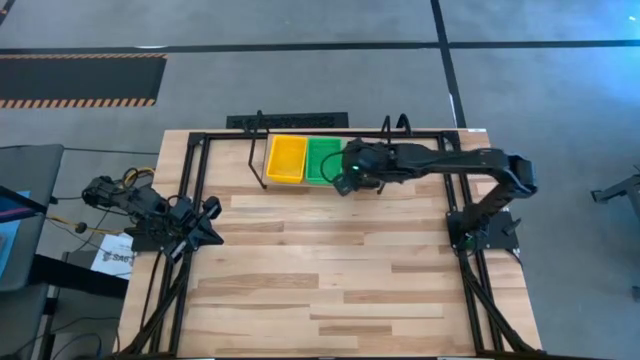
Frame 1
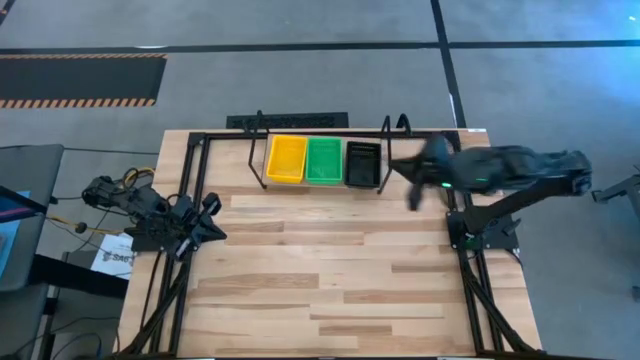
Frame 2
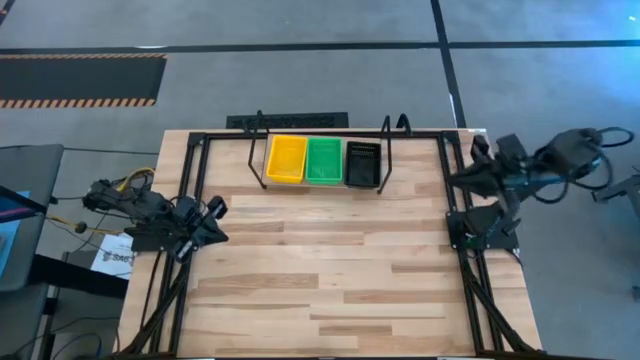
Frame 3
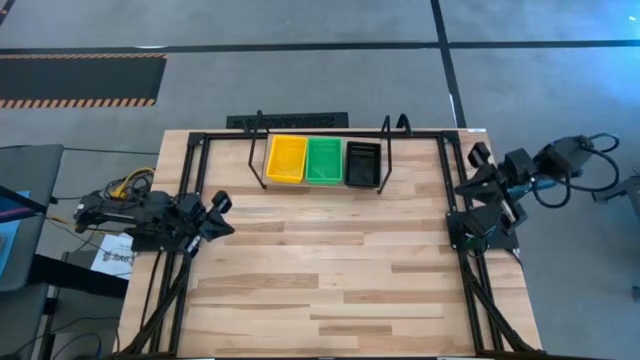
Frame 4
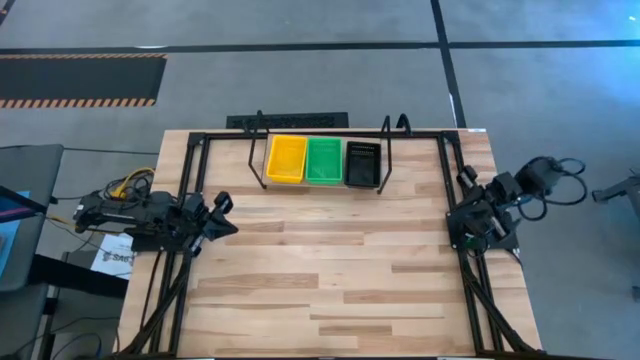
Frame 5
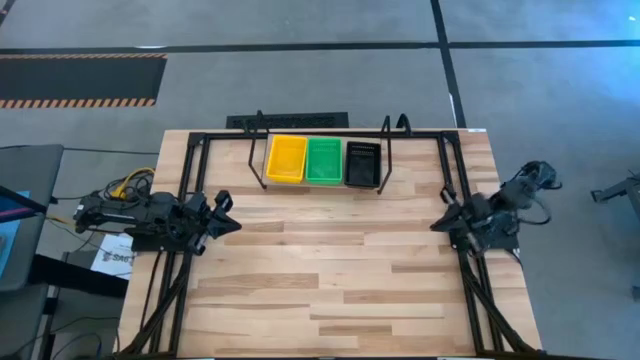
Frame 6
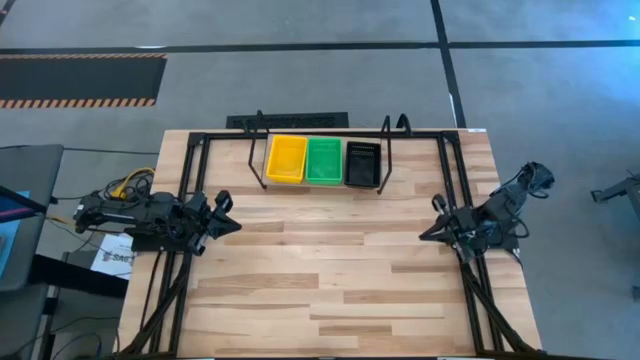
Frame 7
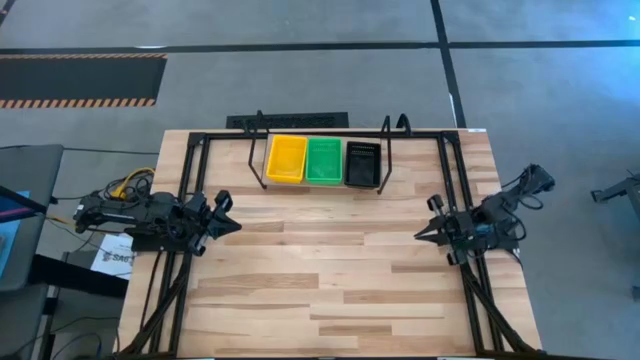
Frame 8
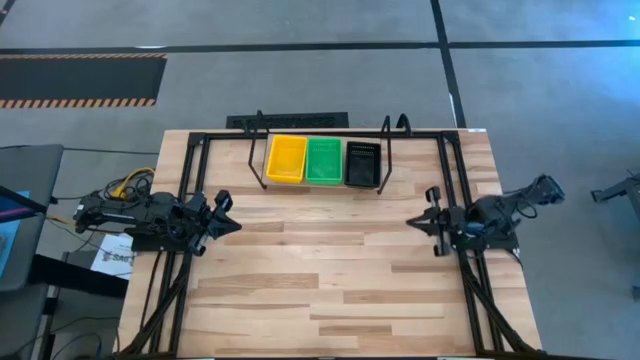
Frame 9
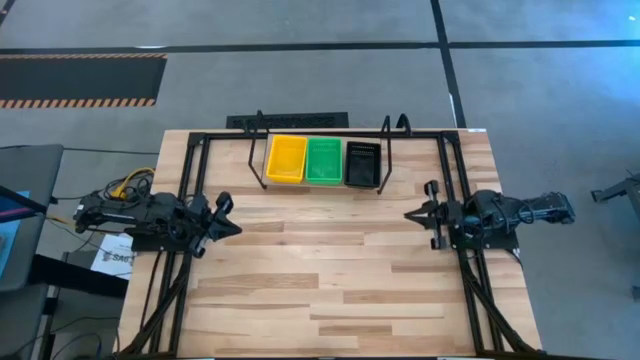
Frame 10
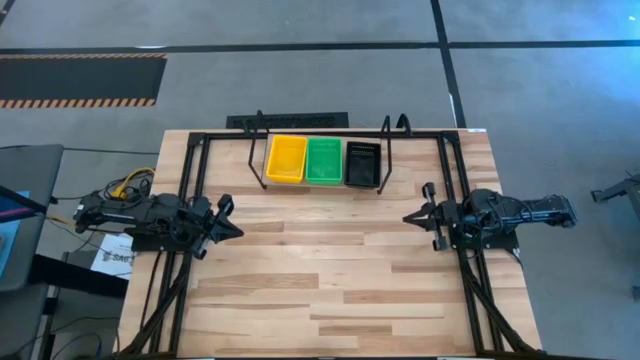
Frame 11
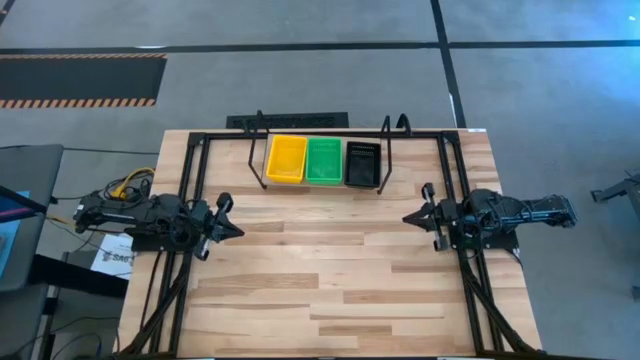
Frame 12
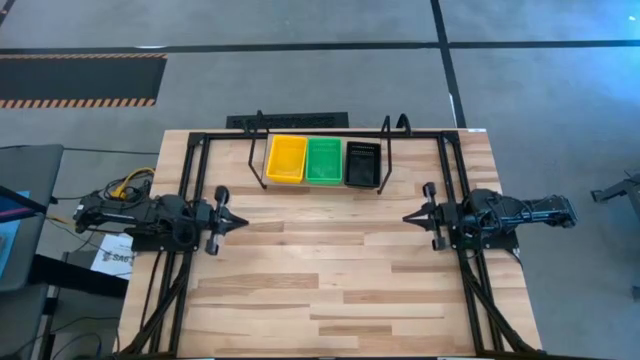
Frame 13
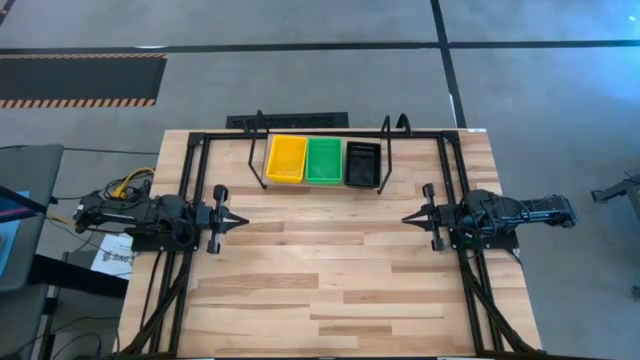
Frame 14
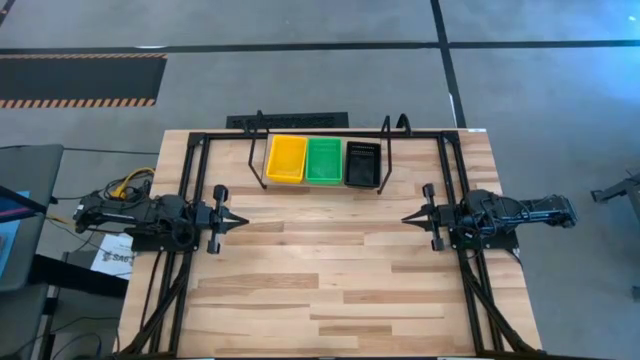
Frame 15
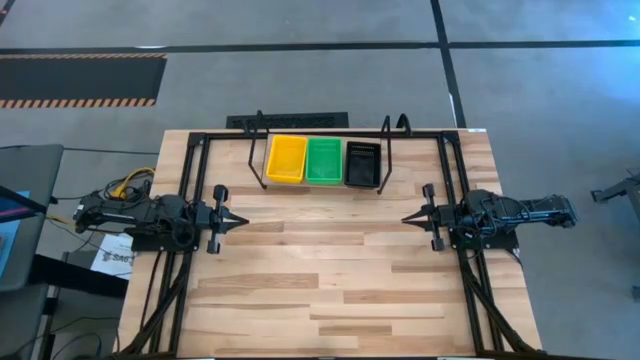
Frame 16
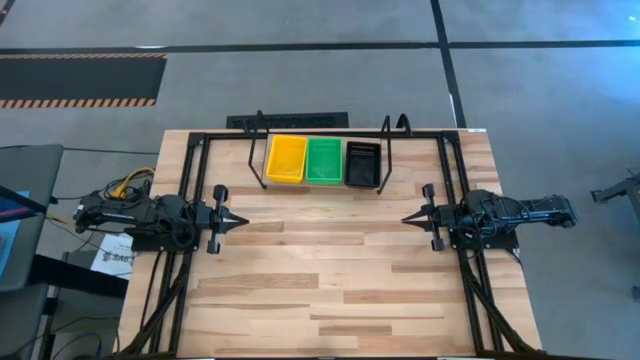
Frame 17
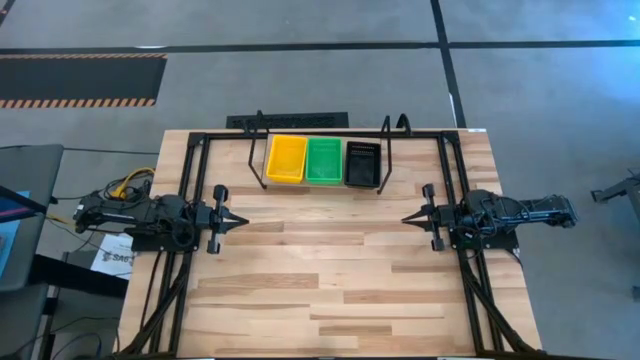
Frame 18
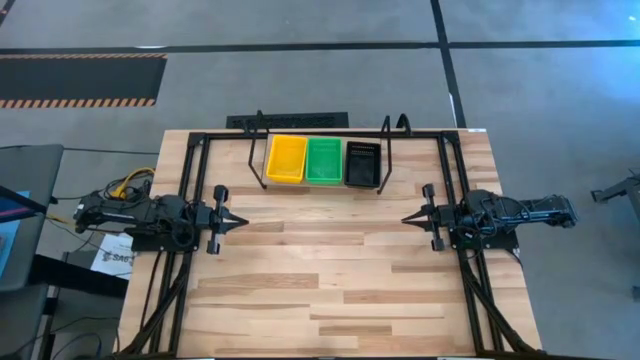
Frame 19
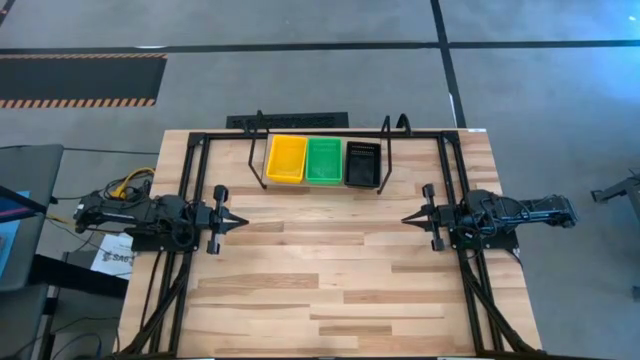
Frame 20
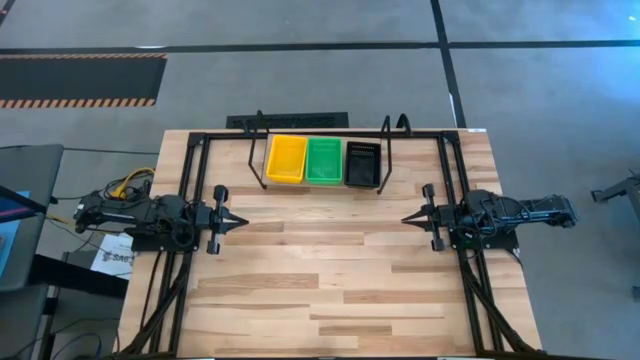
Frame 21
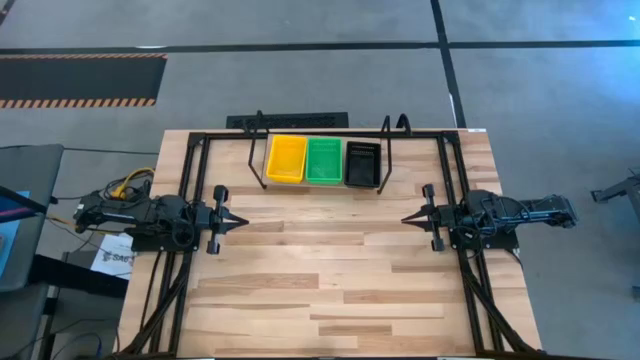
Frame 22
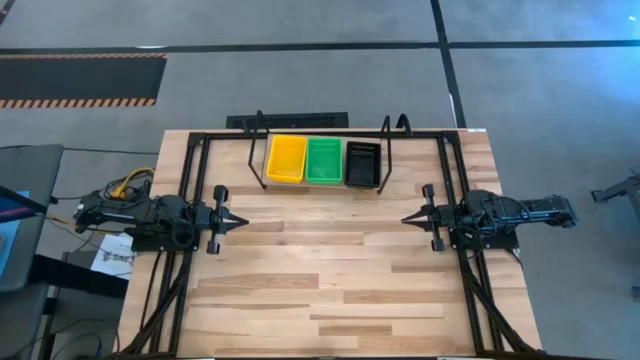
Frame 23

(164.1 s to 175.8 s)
Task: Stack baskets on shelf by color
Return to Home Position

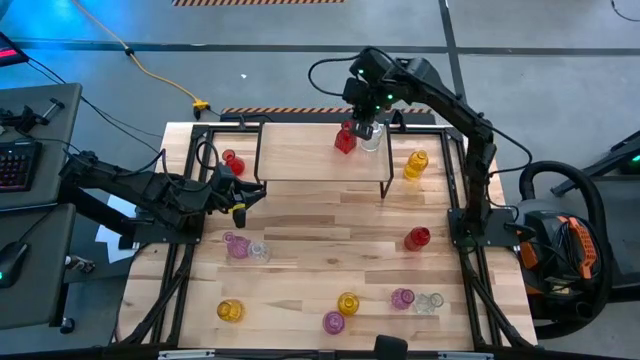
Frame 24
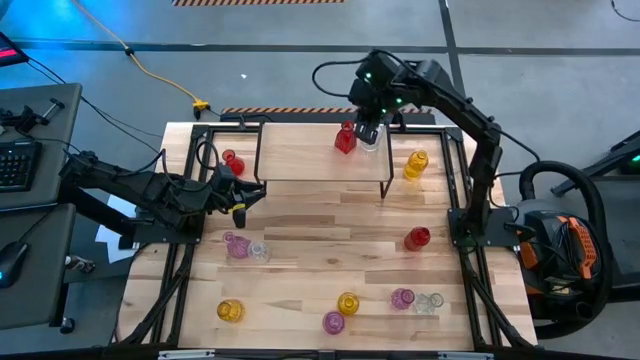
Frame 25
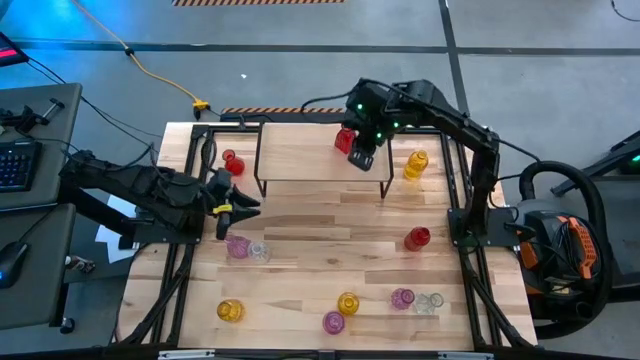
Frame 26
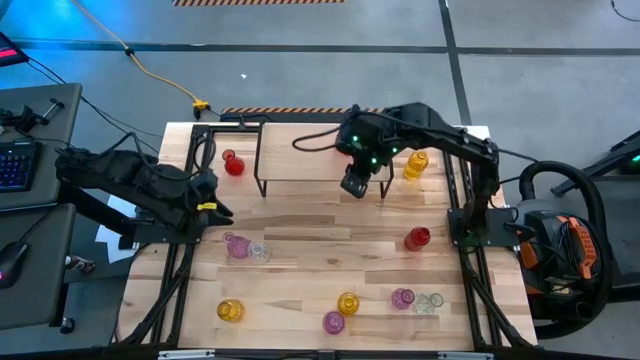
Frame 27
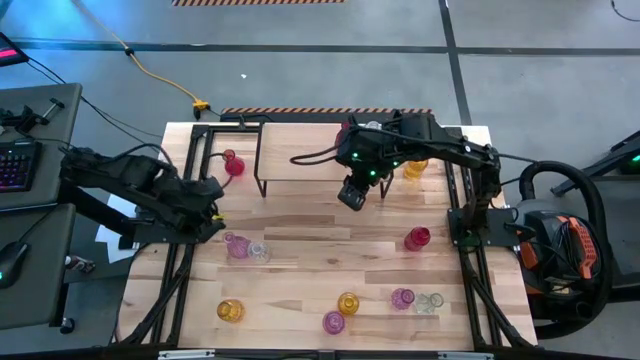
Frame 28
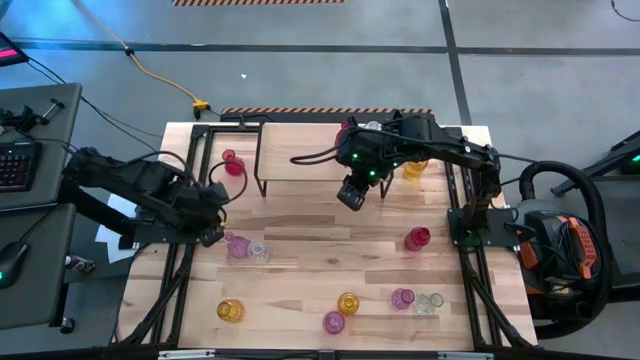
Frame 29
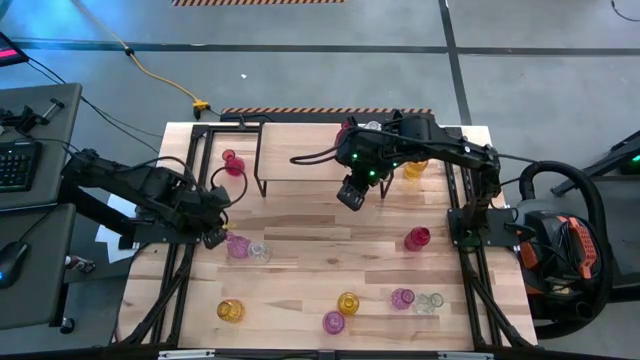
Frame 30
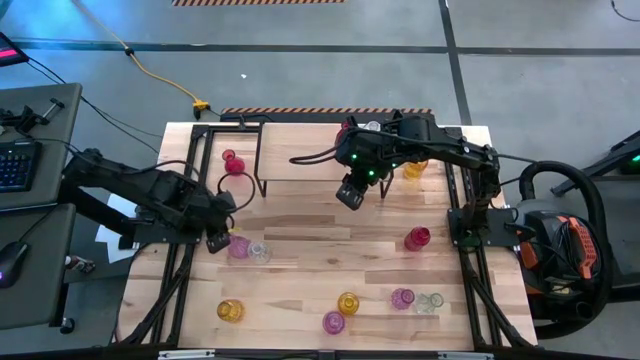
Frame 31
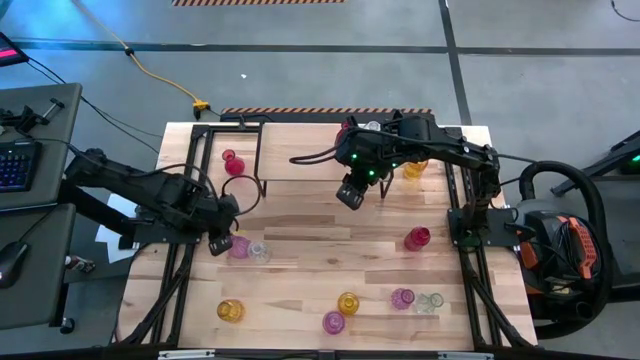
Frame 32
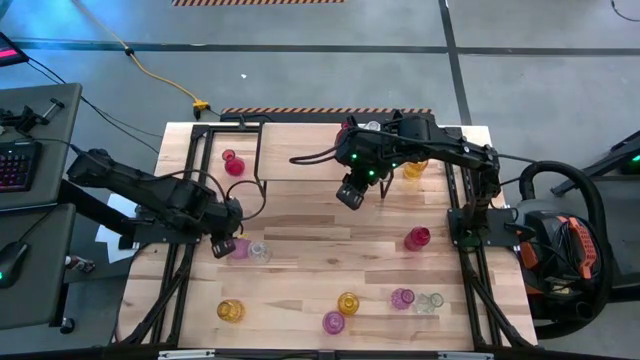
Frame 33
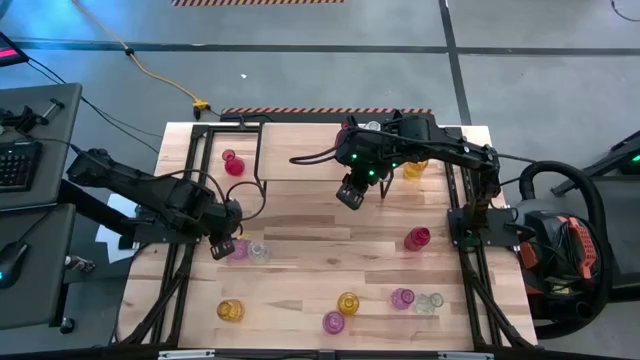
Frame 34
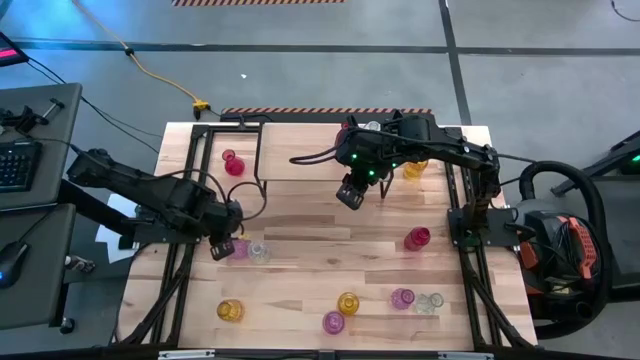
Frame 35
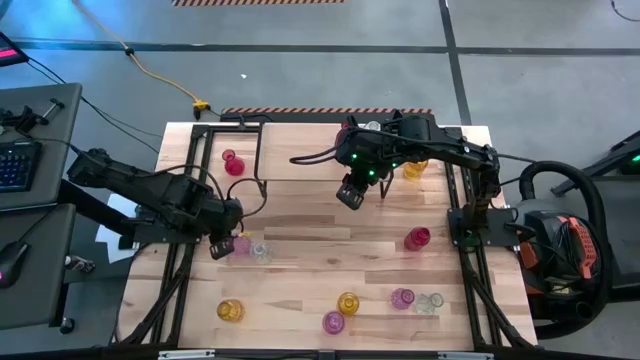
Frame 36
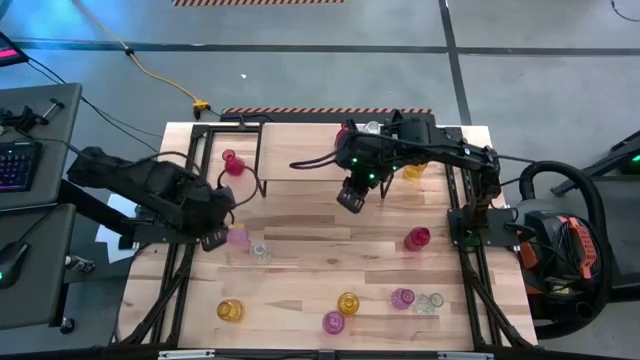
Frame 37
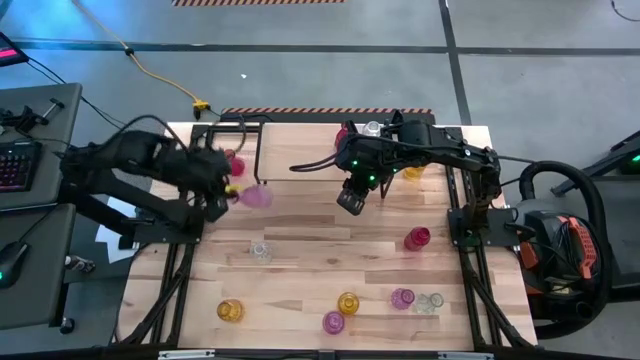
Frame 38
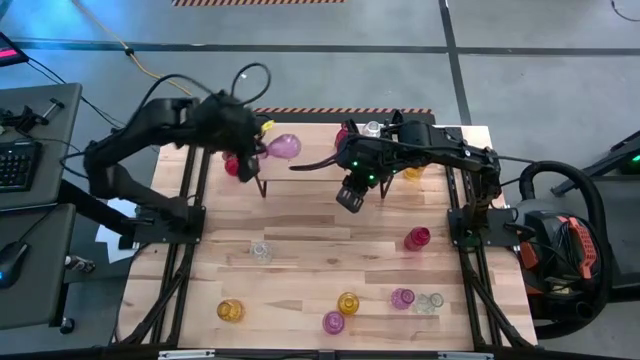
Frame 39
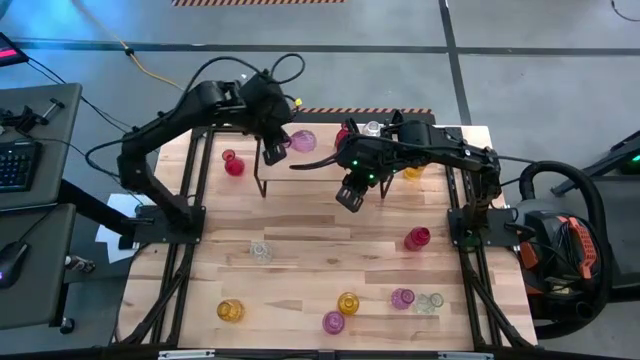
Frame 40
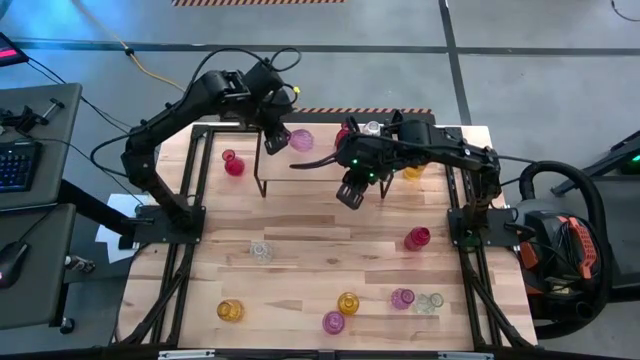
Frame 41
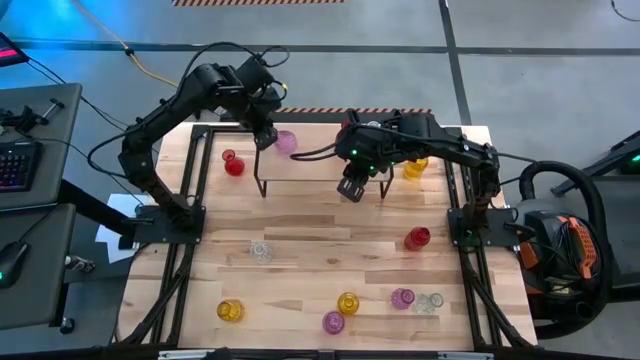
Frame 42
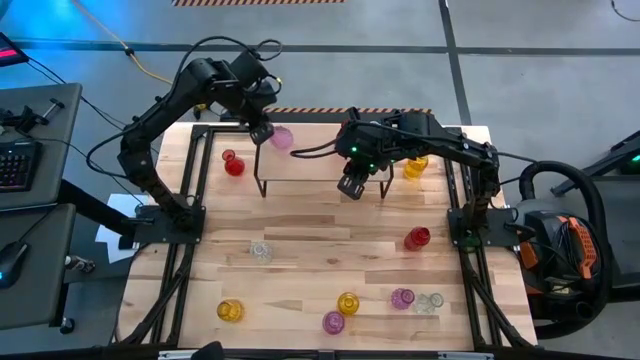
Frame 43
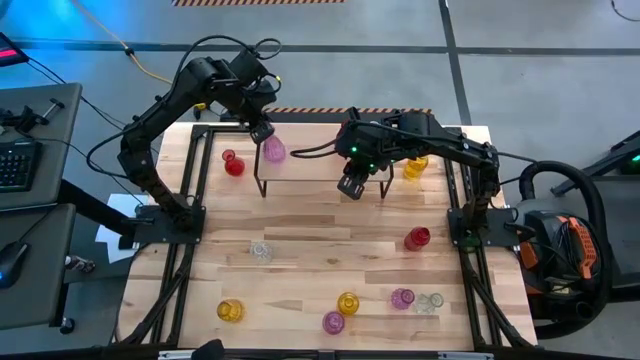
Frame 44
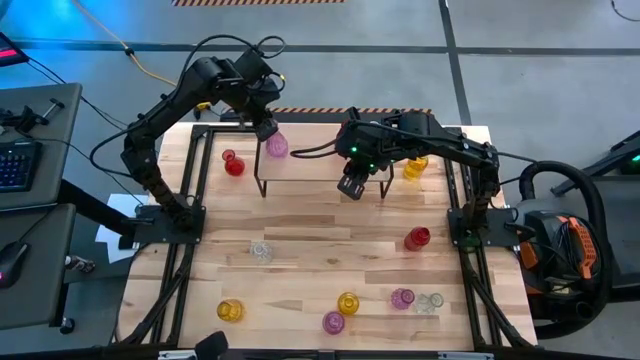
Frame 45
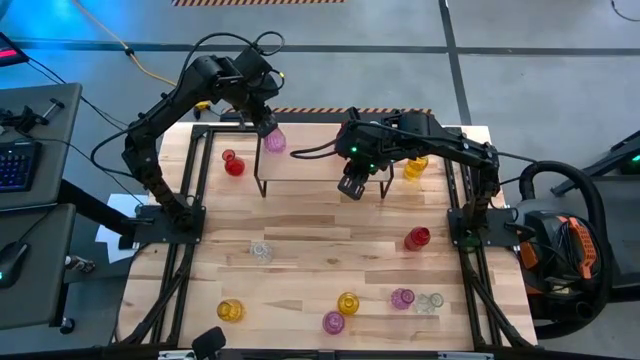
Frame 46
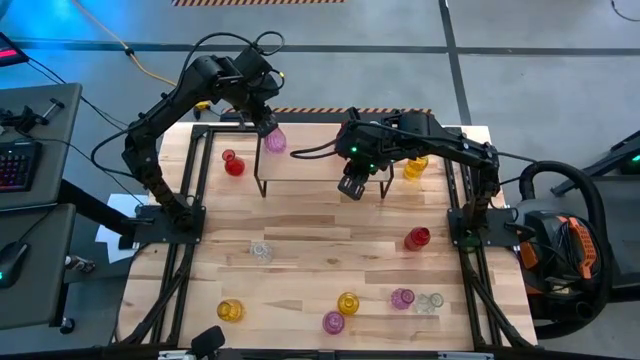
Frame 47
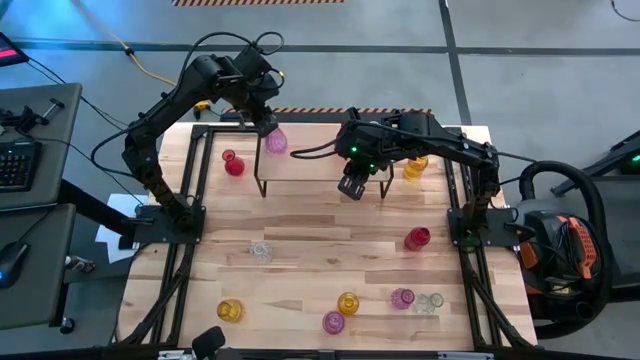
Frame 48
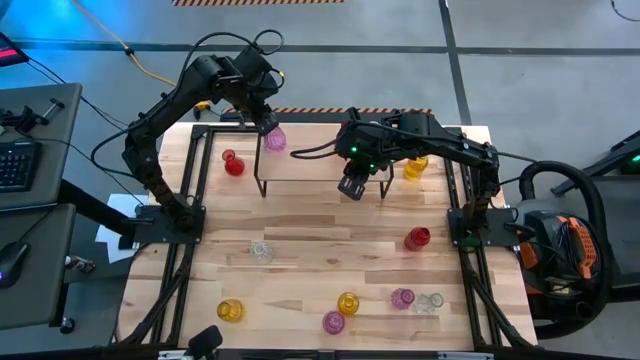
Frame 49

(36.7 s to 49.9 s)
Task: sort vases onto shelf
Put the left pink vase on the shelf
